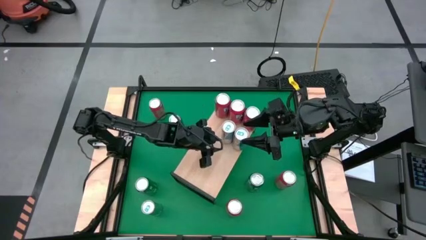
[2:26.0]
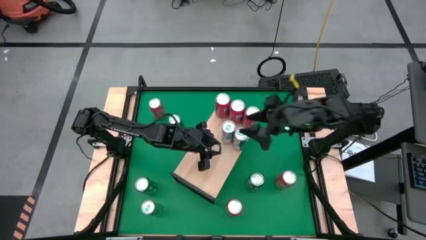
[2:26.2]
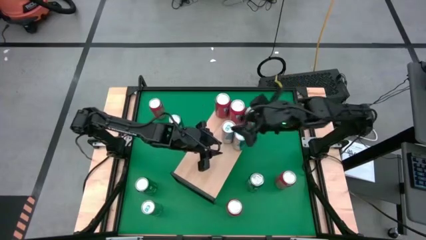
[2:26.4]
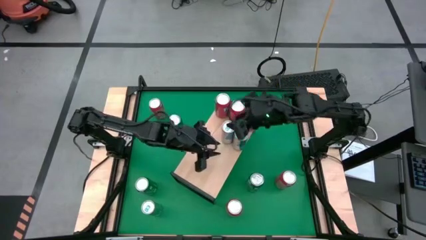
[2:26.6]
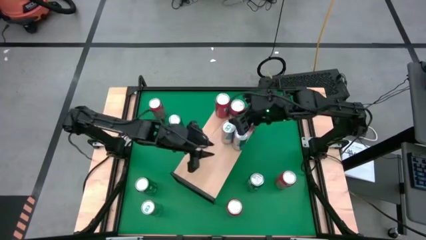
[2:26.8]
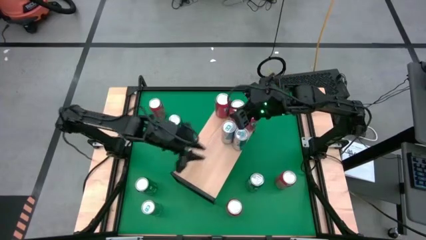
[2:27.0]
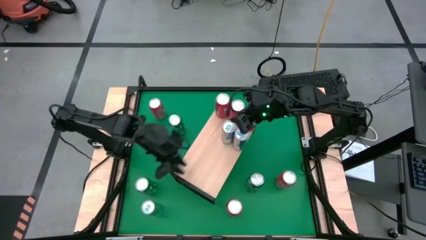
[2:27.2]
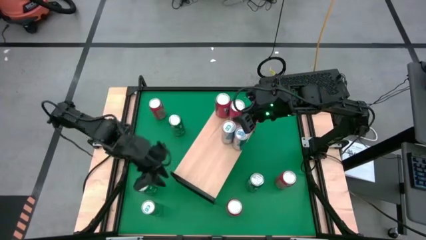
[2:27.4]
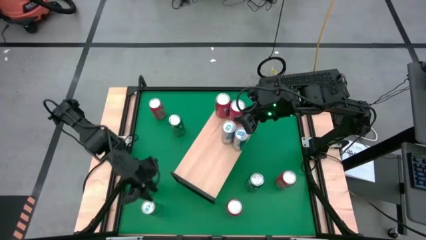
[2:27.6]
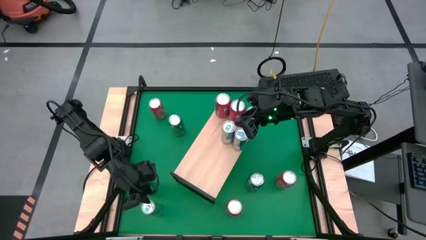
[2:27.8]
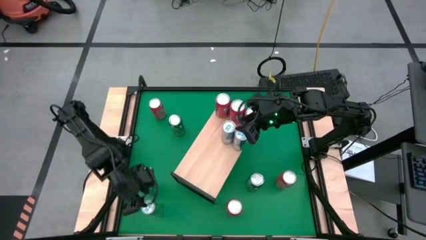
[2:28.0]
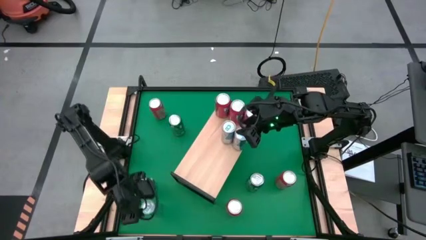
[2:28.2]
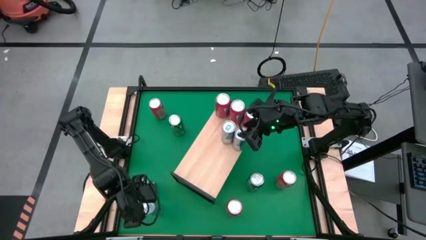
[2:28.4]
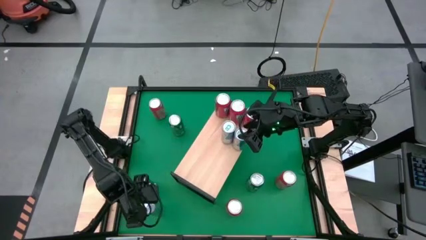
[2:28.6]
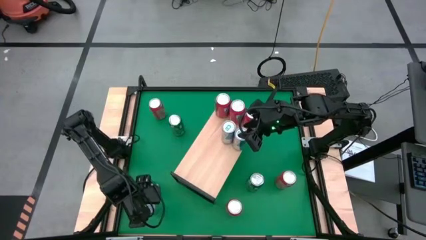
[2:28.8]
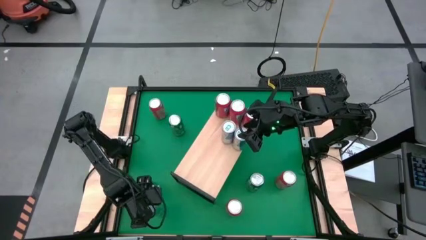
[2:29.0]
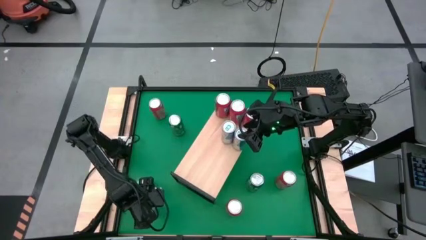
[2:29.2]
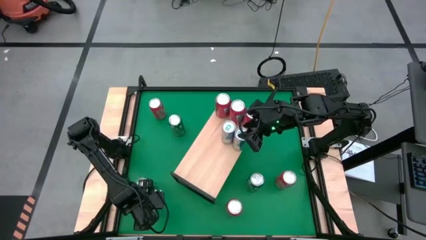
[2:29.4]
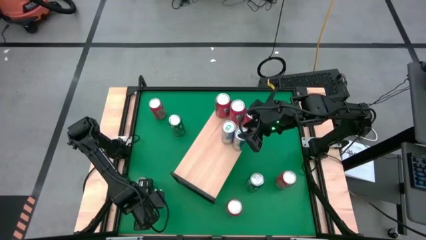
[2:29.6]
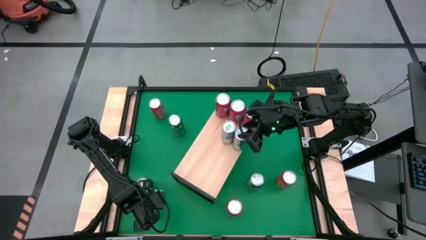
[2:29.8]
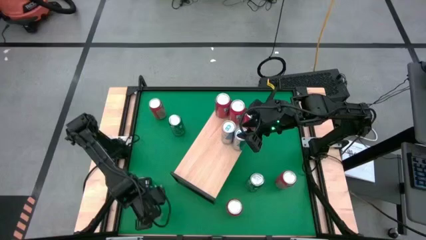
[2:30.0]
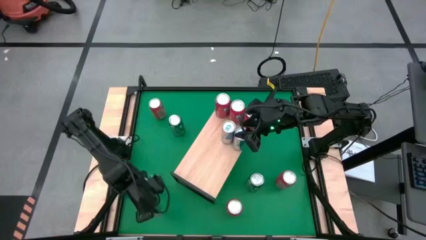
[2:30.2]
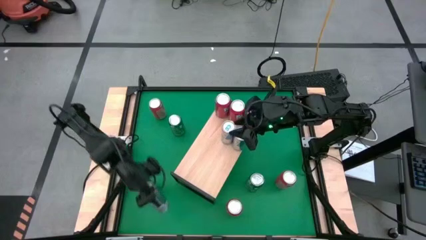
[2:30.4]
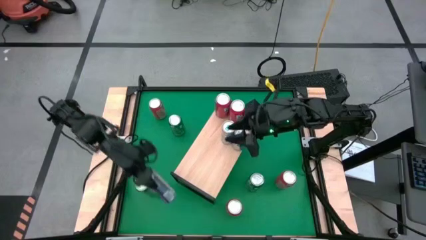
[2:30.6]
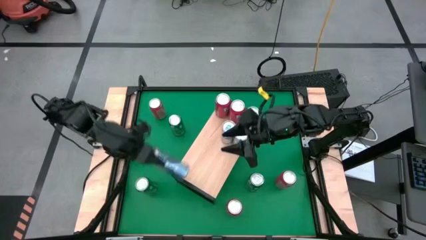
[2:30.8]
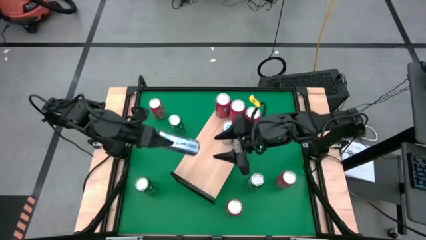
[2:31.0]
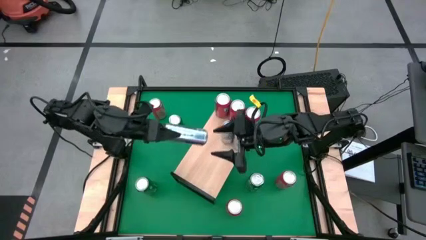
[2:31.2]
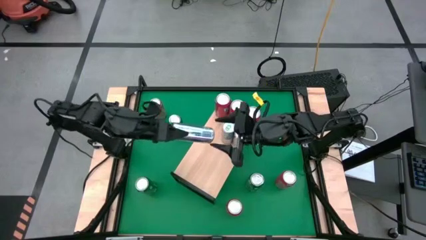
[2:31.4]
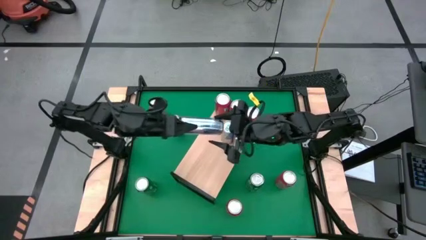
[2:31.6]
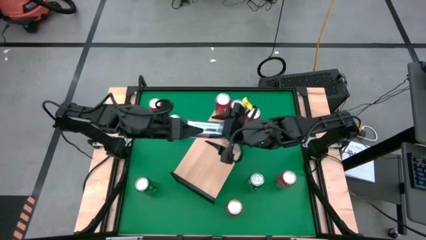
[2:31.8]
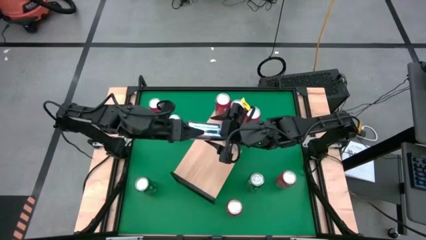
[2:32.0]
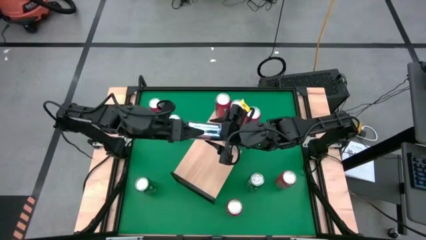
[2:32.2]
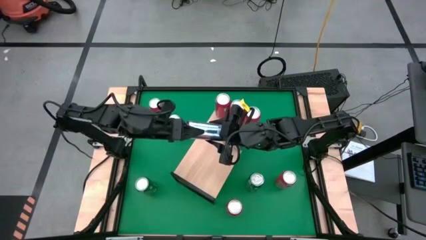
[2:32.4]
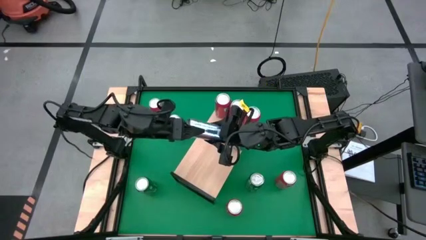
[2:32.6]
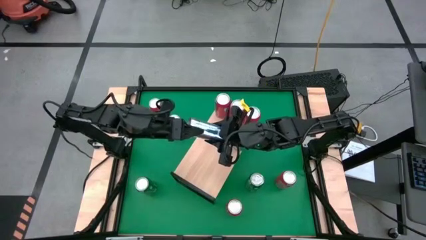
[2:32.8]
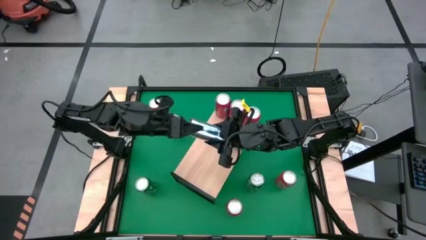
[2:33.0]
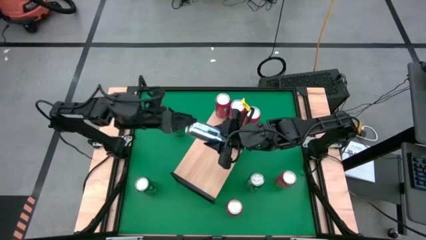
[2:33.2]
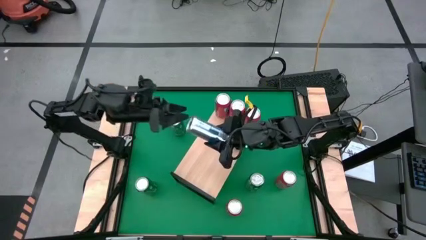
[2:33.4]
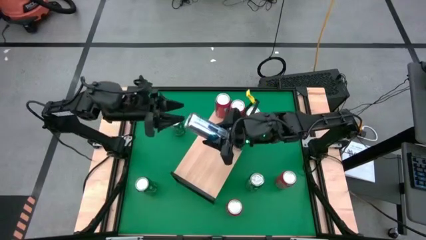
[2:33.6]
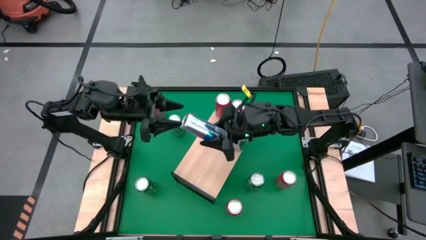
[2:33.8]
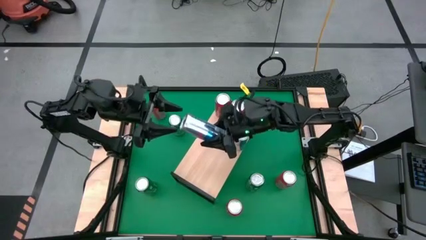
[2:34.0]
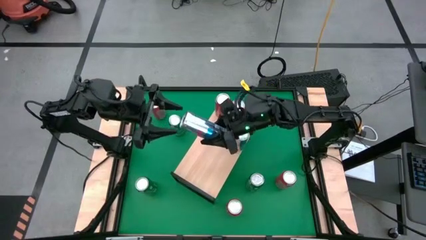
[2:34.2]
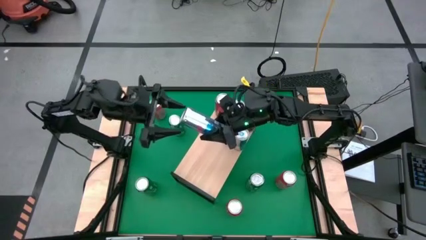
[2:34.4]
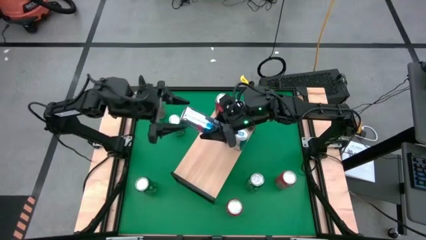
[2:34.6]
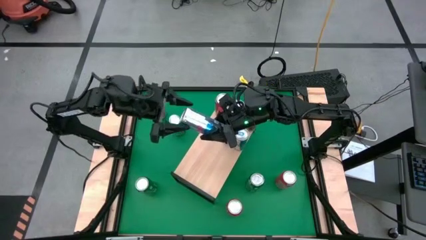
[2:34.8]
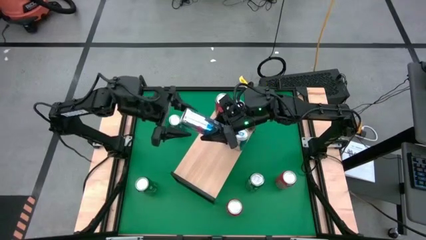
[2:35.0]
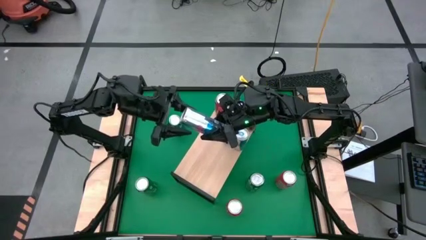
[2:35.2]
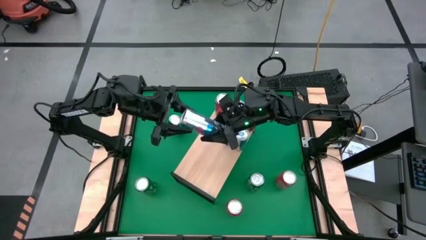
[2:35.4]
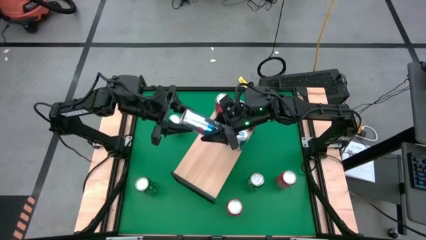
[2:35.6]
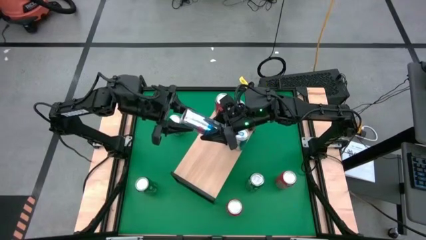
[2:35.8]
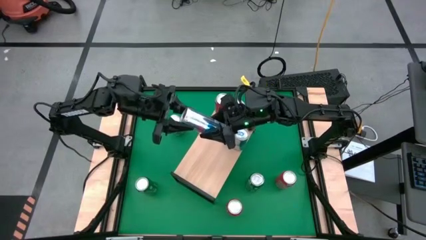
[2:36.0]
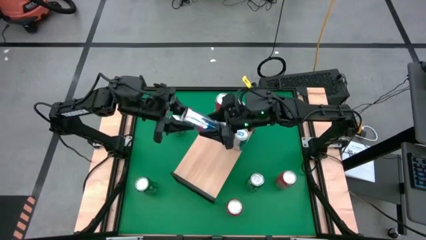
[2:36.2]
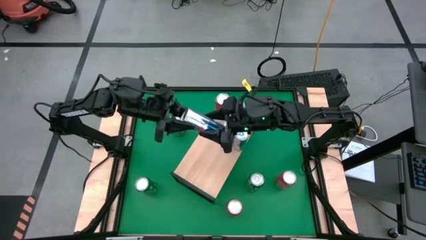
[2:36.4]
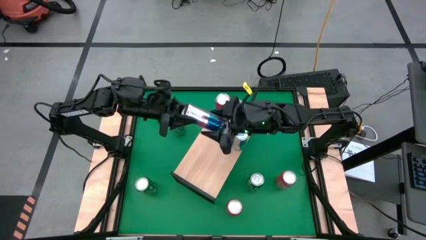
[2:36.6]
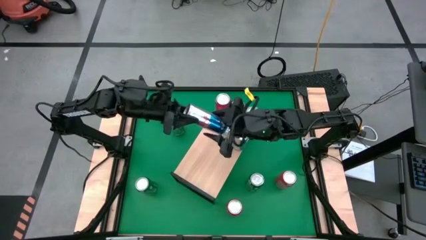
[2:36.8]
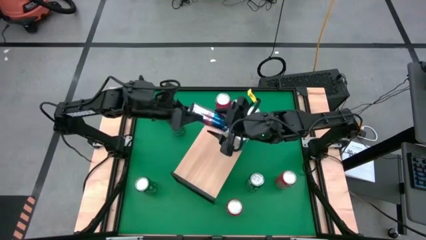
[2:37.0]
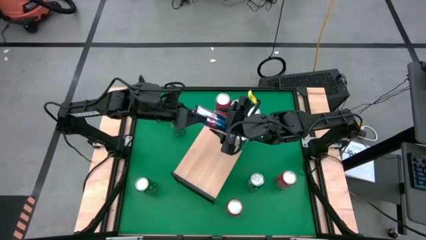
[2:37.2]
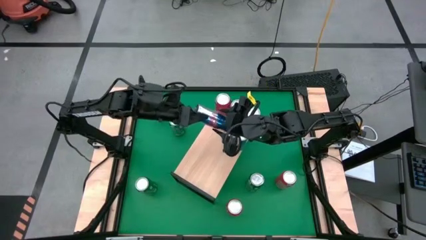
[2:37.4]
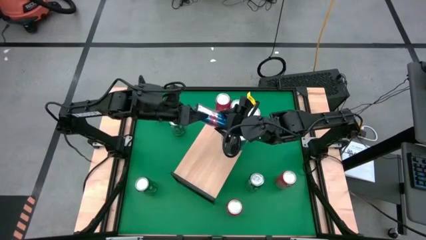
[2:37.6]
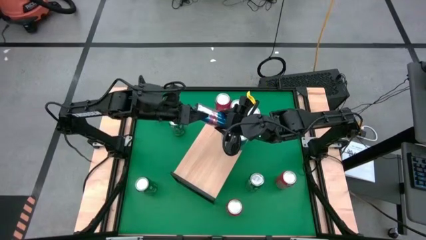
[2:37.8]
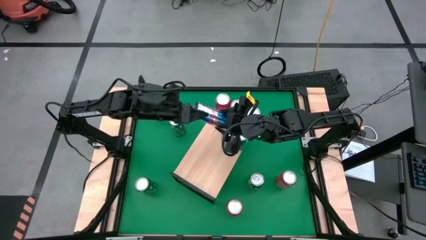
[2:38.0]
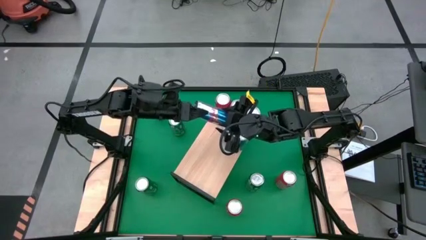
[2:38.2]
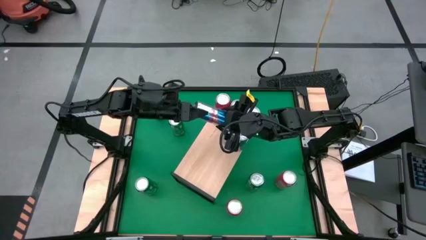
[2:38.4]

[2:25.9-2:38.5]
Task: Sort soda cans
Put the blue soda can on the shelf and align it with the other blue soda cans

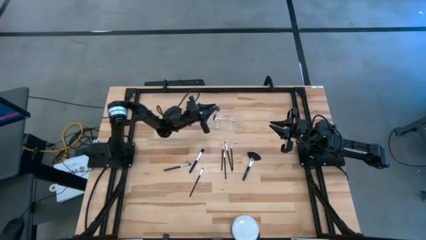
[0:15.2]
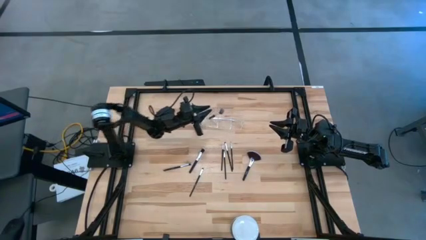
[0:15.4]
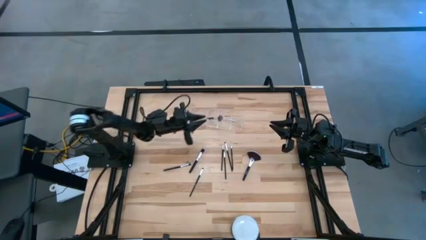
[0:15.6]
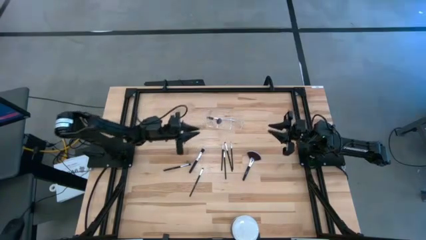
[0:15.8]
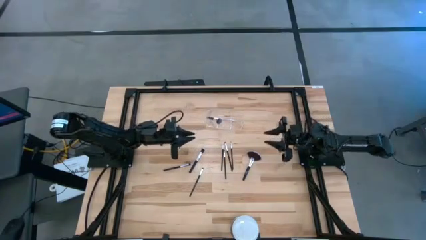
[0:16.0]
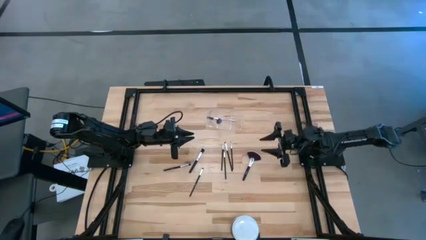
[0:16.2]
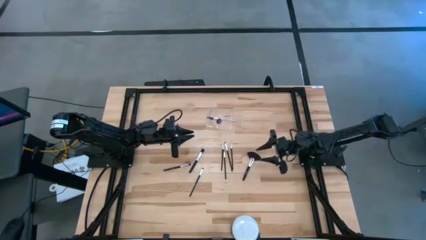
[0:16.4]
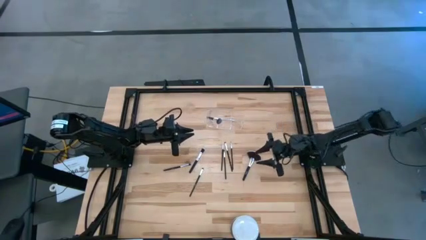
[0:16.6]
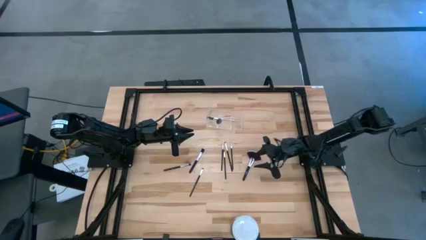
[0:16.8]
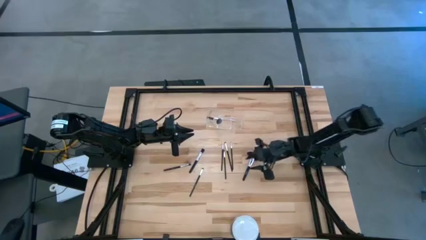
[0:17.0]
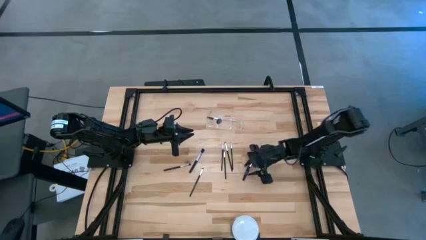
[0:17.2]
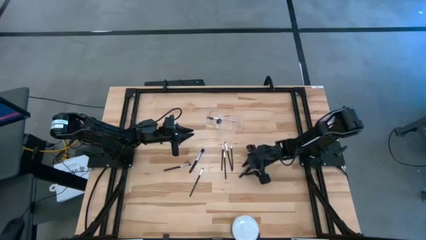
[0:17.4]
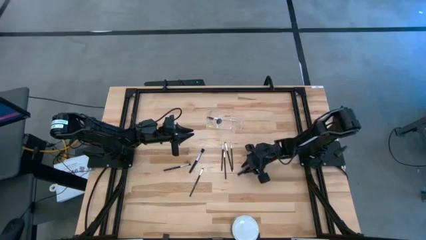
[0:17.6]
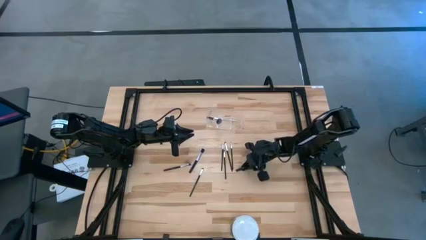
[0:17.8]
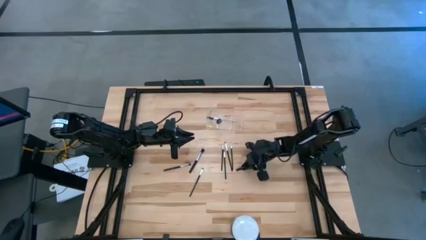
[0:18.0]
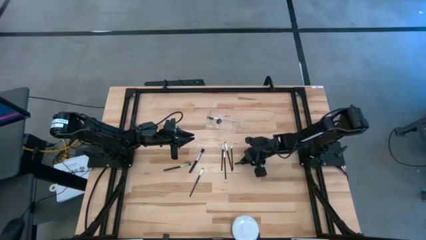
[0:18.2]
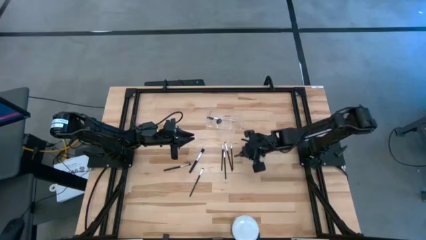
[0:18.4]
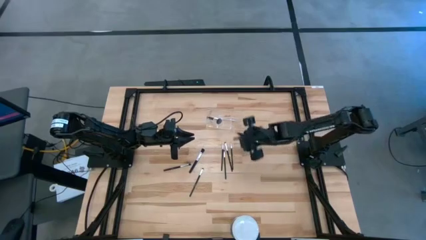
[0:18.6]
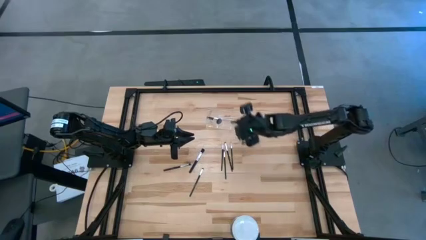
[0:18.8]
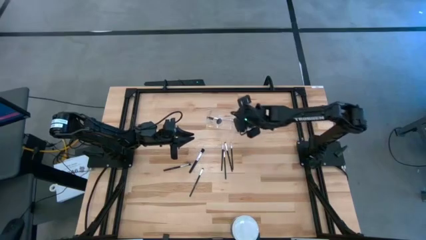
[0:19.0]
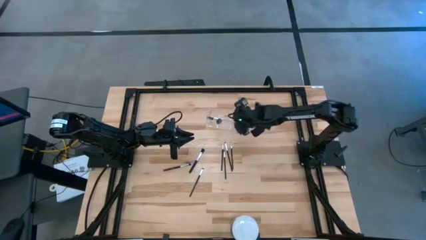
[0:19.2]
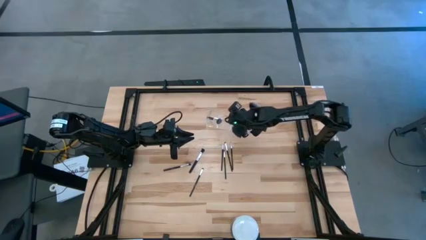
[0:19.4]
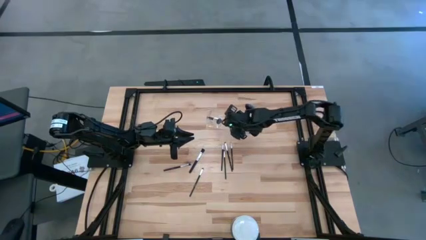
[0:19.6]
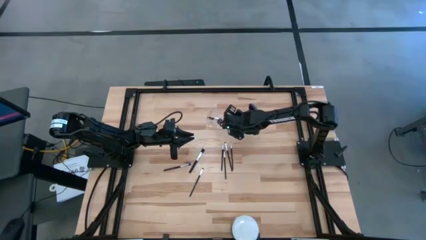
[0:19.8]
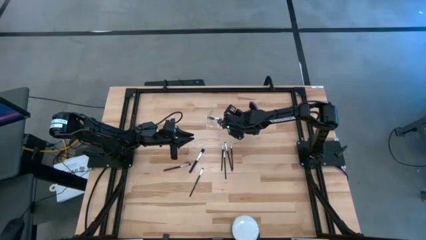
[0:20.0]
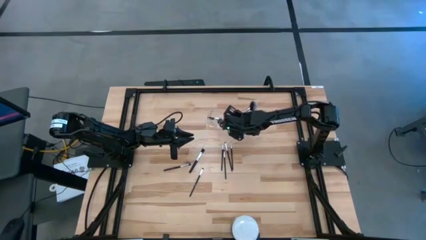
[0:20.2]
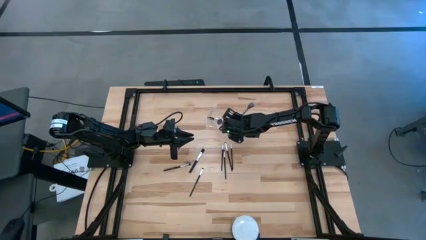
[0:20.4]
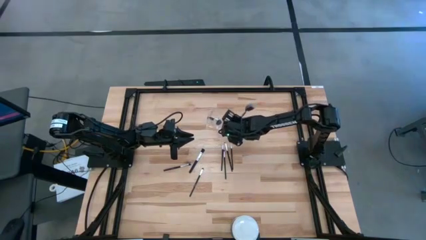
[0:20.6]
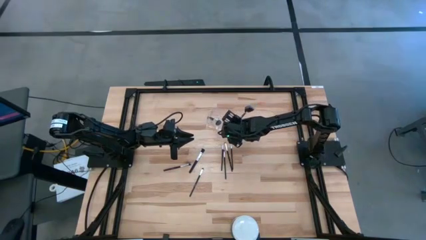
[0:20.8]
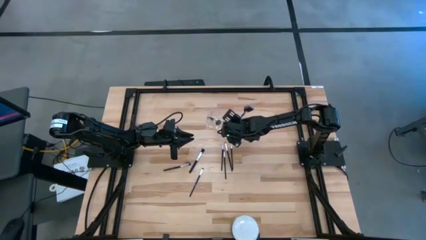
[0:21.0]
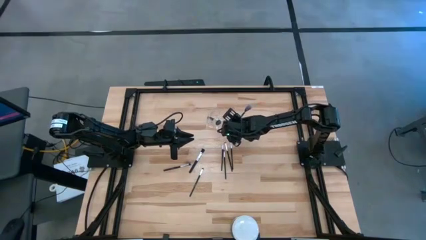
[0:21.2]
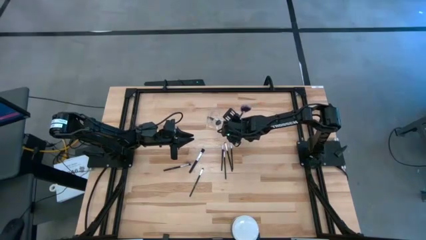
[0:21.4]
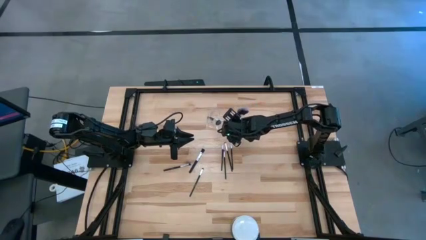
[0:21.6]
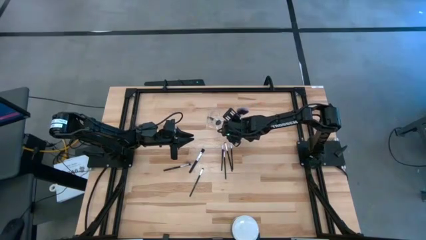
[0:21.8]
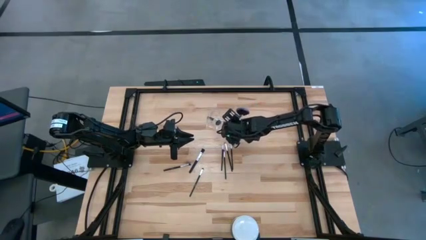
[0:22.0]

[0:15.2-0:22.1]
Task: Put items in baskets/containers
Put the black highlighter brush into the transparent organizer
